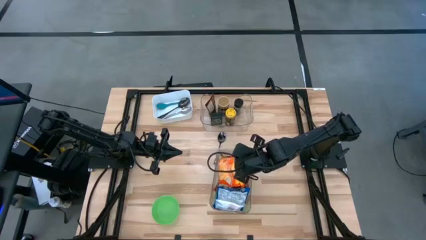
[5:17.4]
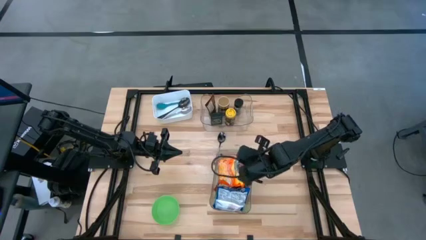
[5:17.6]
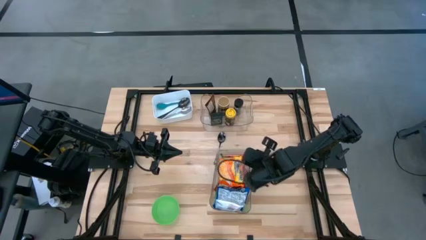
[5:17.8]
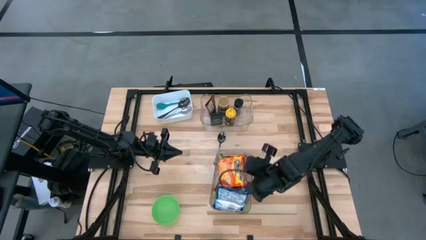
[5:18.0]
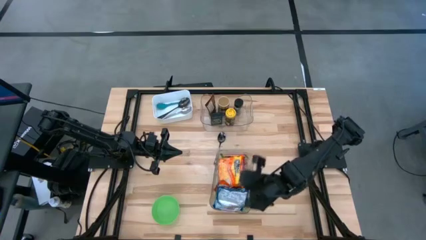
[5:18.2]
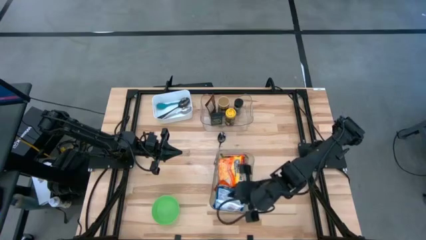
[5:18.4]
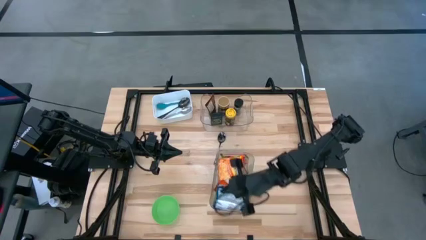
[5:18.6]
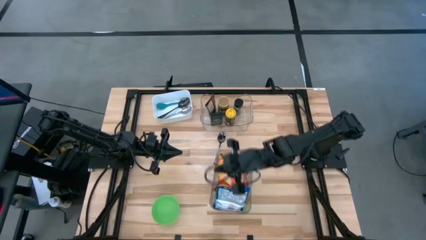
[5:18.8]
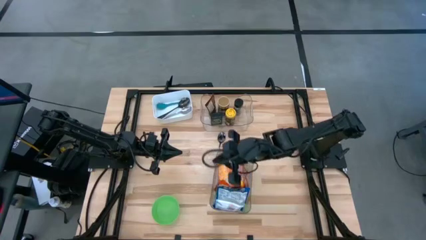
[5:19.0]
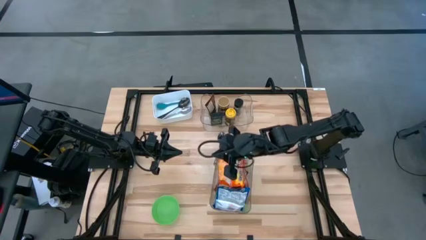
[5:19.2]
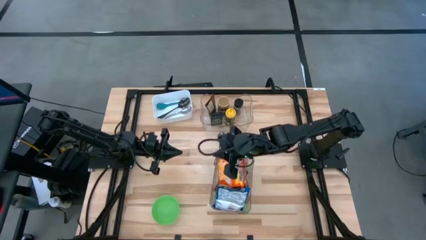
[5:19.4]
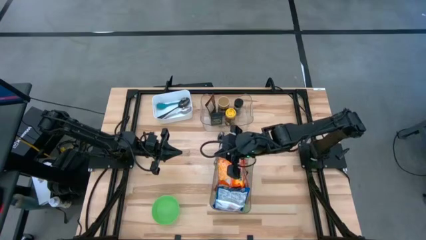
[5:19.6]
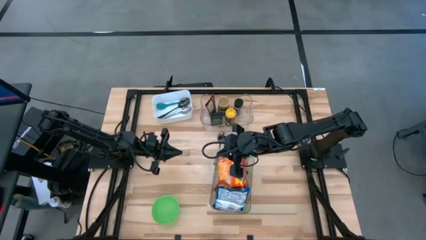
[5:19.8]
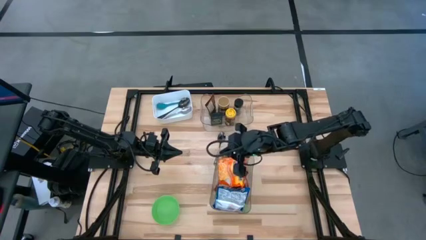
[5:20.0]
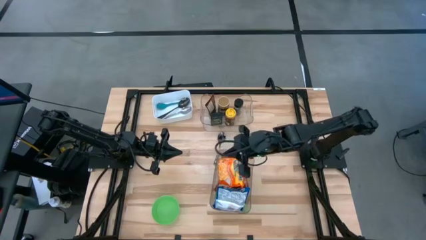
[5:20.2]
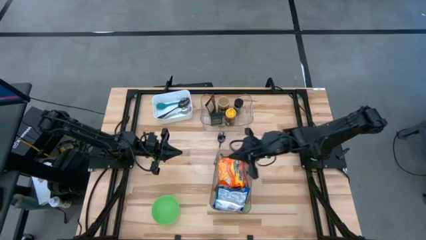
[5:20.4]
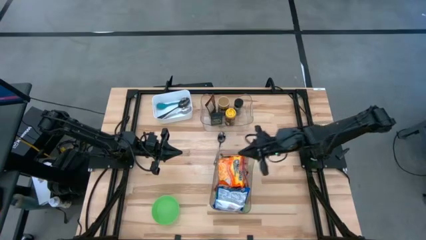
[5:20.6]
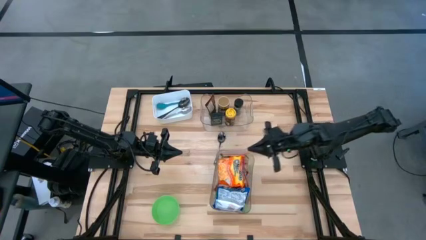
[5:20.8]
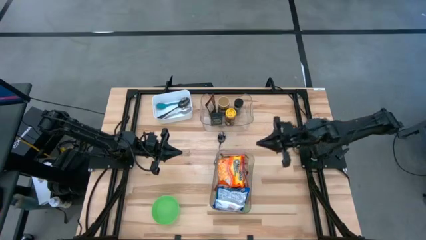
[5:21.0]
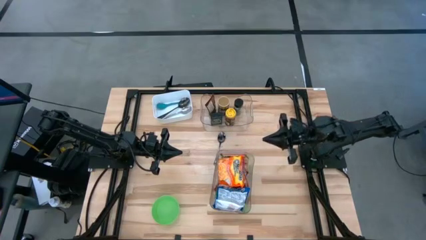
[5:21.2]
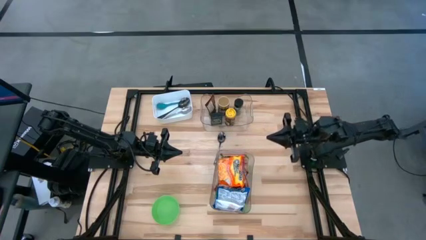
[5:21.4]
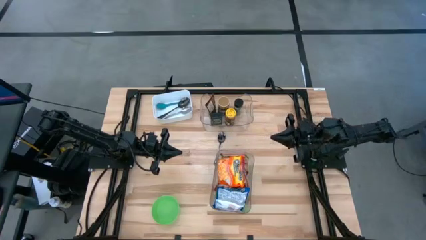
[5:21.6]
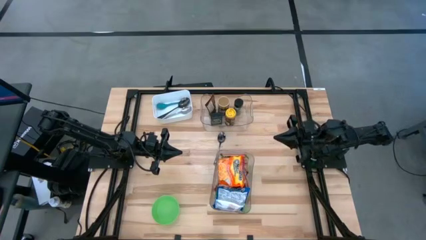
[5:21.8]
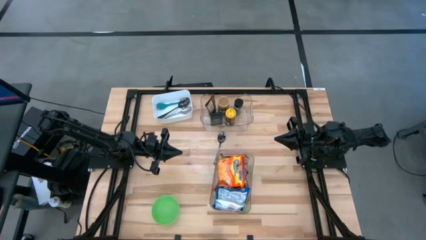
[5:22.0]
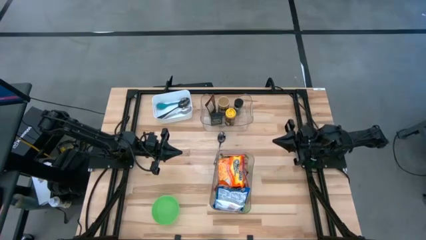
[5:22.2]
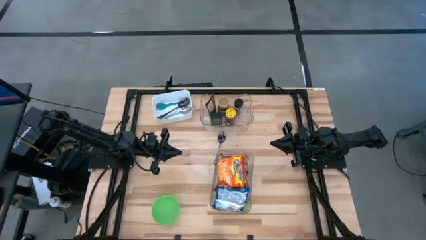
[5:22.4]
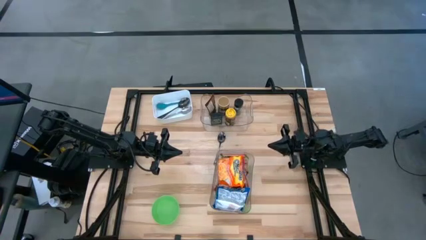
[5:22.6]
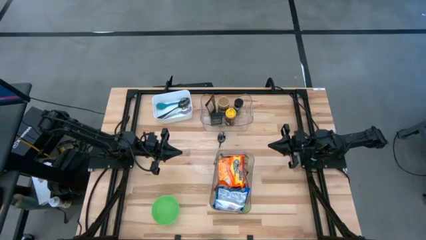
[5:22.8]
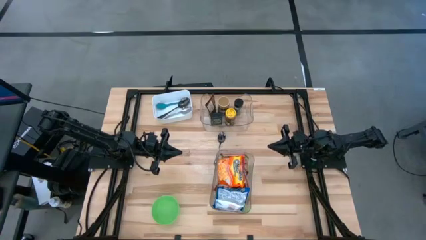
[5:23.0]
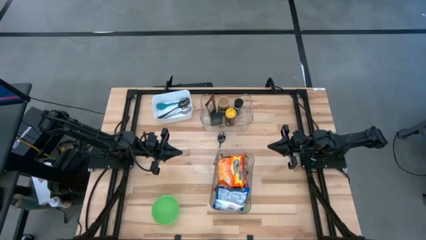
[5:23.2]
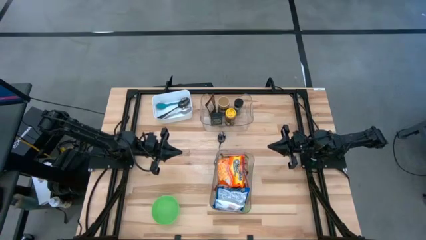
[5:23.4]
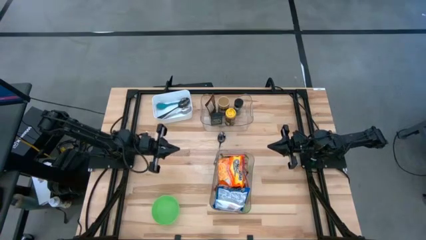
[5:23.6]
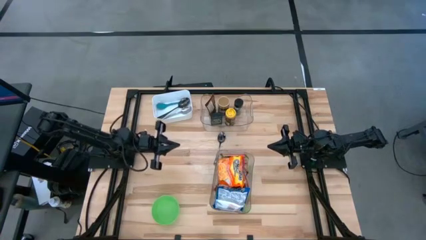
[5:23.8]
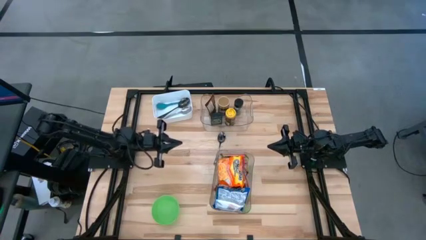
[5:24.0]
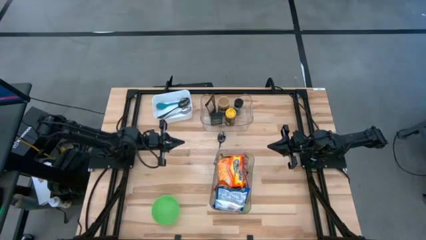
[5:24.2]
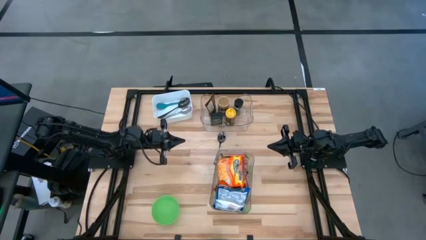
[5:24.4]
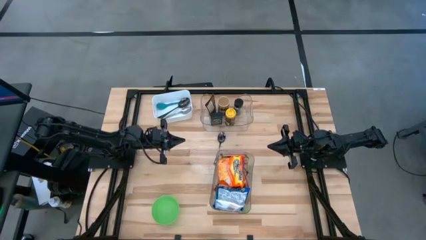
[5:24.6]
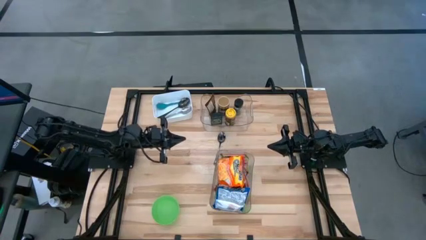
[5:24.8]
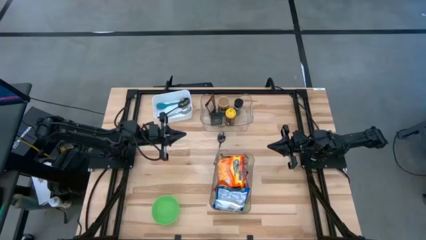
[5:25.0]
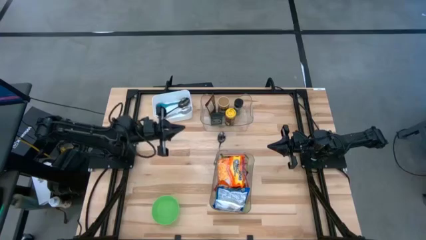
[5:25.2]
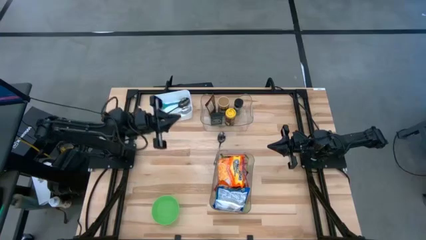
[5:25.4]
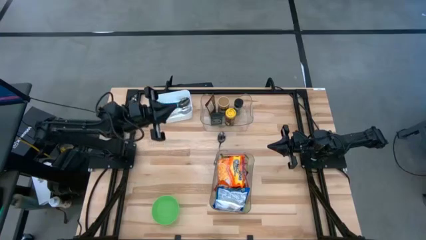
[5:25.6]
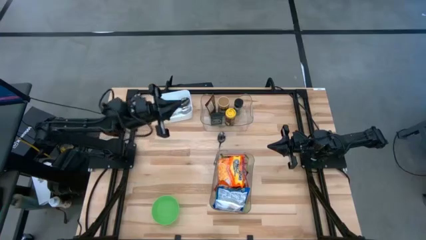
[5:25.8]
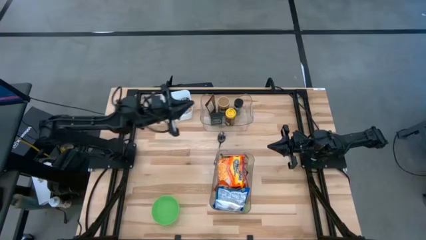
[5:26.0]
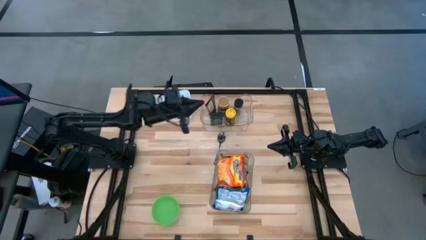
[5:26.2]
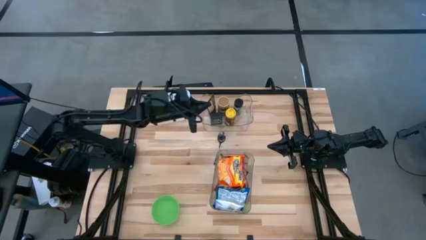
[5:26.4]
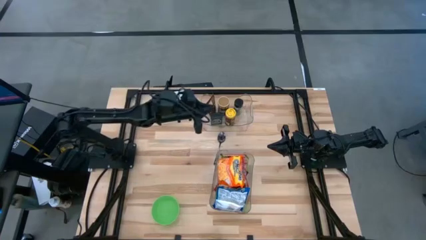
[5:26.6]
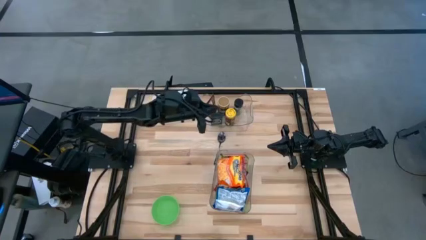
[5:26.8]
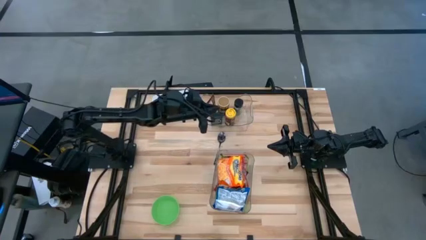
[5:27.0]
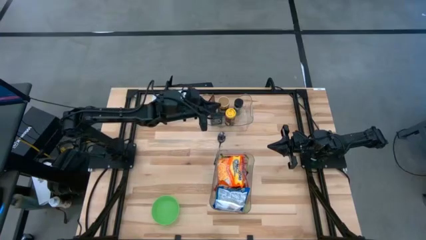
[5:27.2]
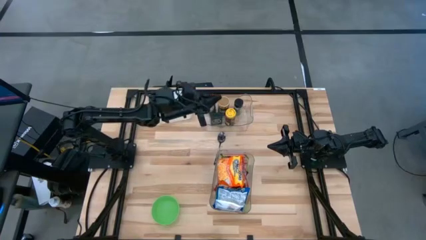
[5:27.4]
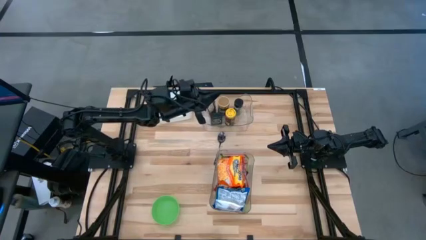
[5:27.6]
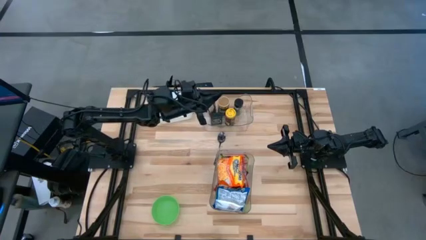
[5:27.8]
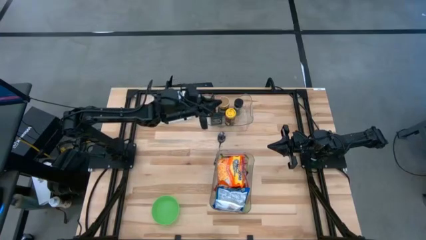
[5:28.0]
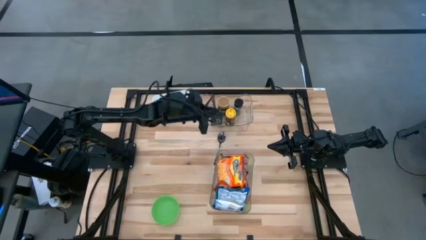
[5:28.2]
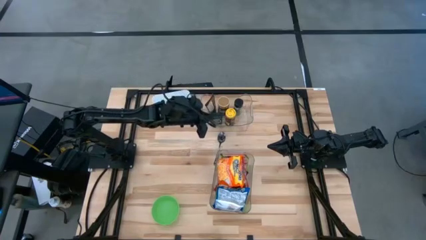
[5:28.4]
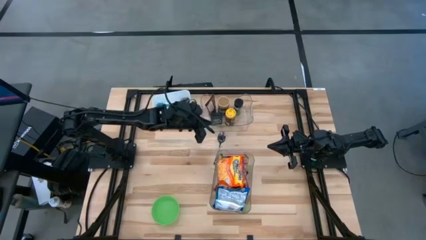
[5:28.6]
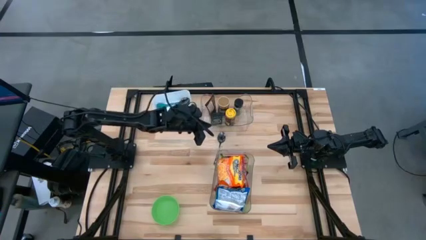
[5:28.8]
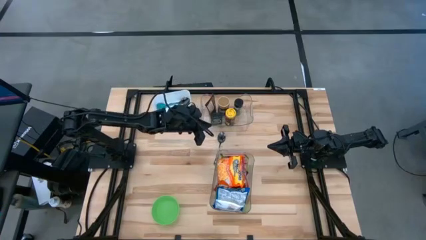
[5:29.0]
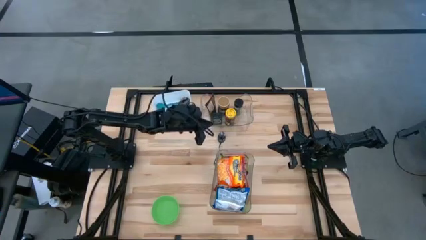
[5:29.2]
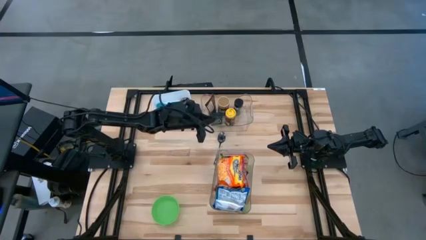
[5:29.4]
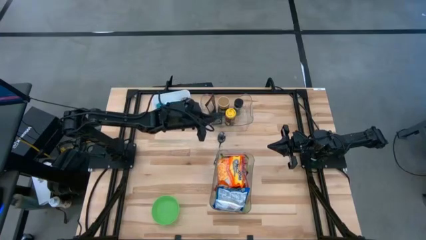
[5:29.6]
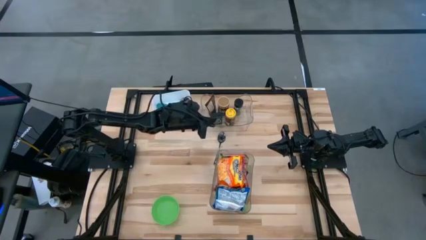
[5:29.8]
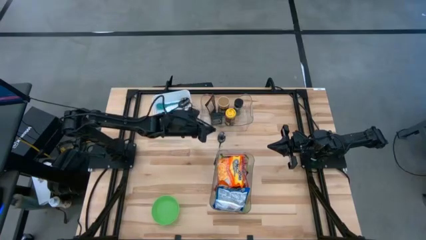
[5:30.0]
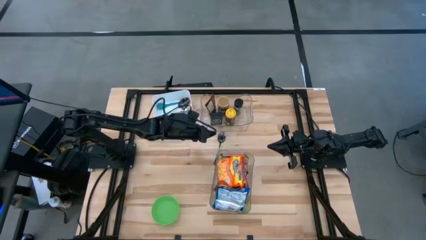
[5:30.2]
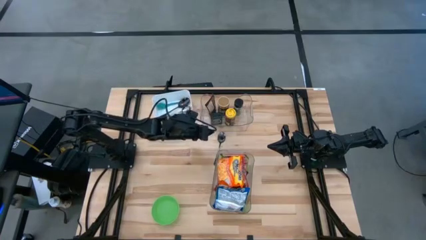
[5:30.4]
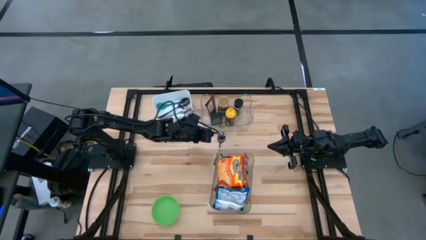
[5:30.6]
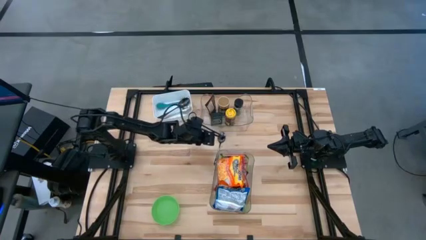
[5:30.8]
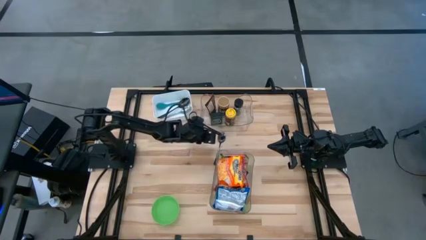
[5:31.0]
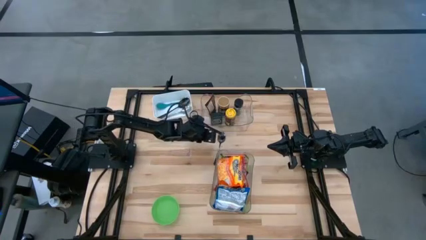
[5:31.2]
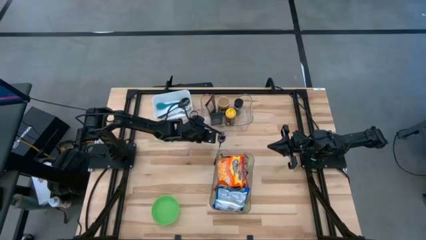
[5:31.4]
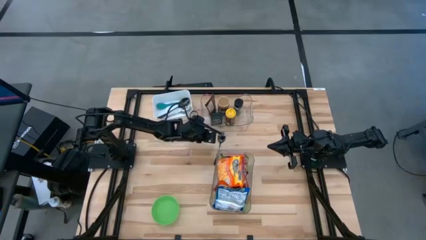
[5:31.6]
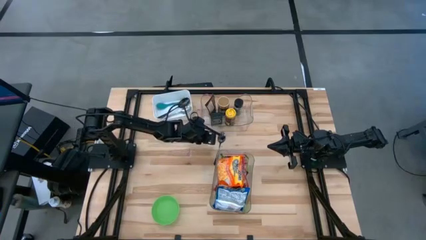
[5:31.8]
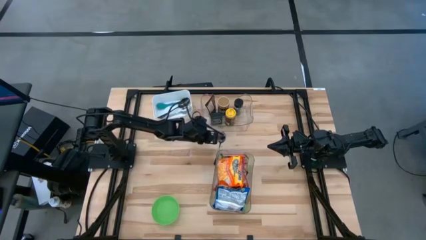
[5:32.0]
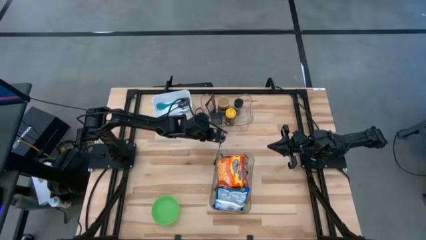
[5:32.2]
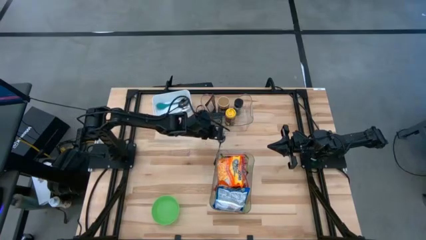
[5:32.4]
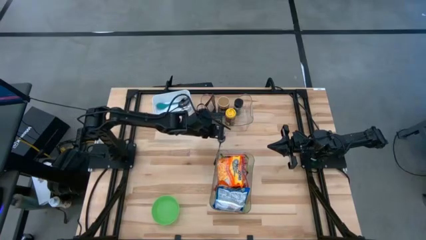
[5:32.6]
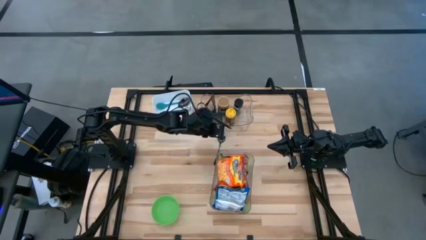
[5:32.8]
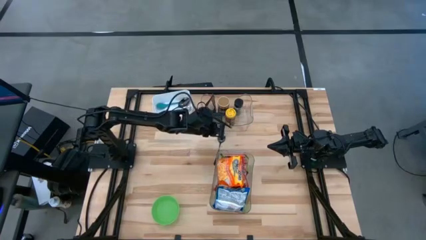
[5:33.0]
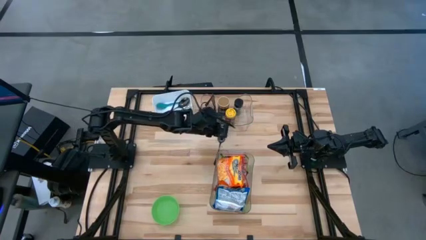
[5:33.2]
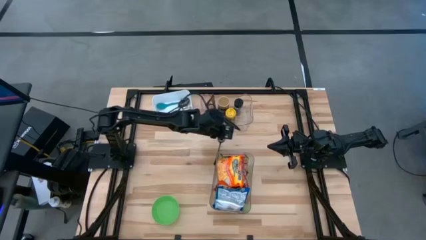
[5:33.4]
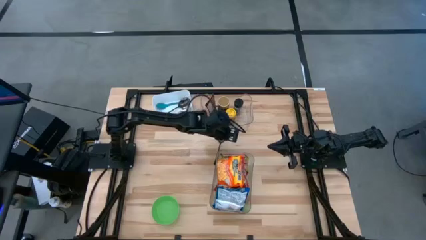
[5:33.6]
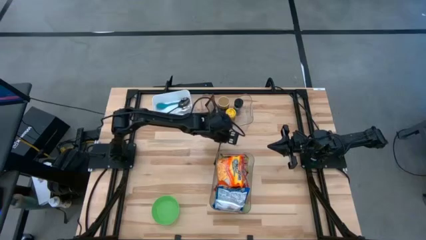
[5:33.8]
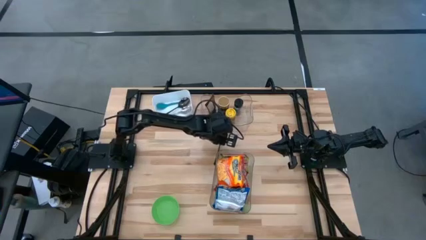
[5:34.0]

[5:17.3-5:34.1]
Task: Pick & Place Food Item
Put the black spoon into the white bin
